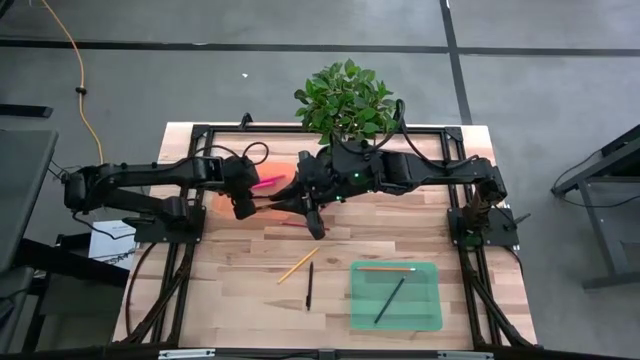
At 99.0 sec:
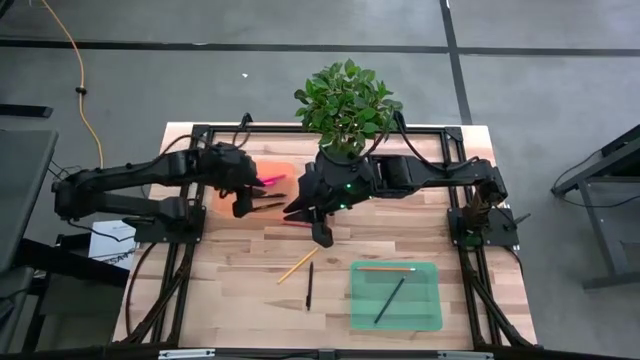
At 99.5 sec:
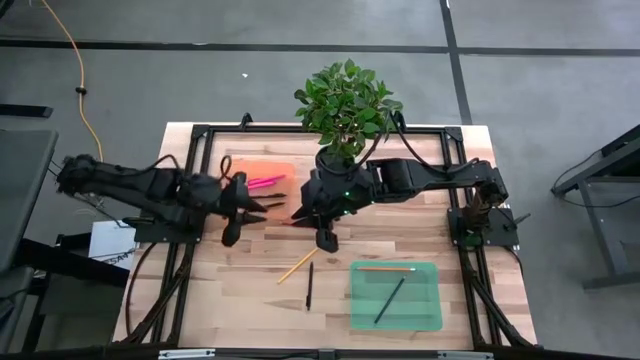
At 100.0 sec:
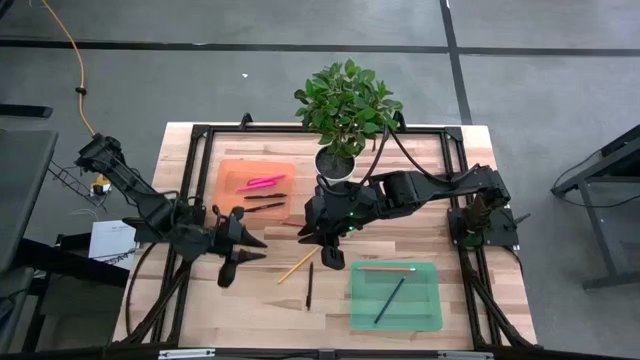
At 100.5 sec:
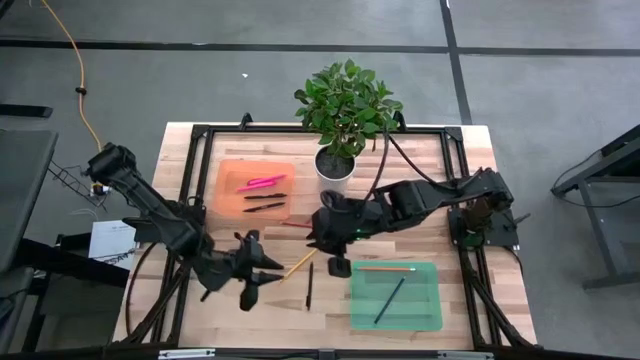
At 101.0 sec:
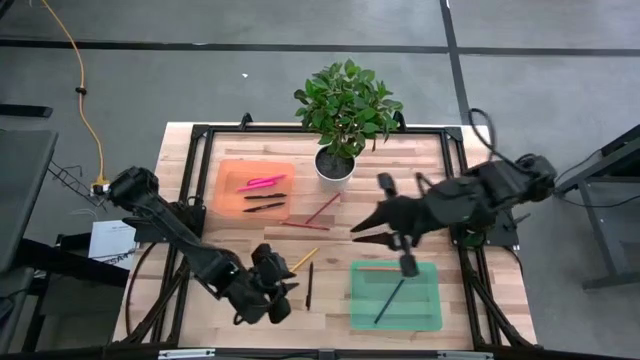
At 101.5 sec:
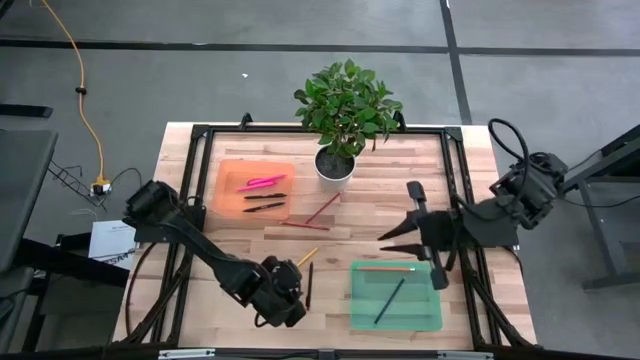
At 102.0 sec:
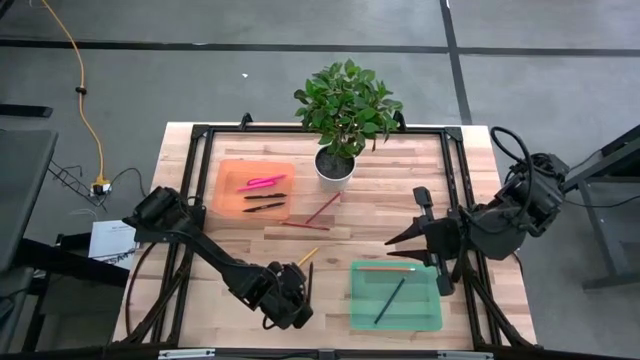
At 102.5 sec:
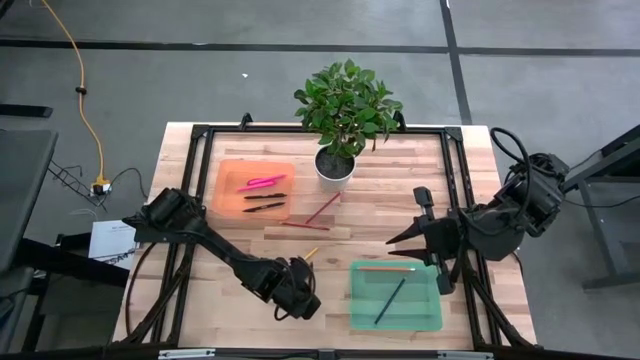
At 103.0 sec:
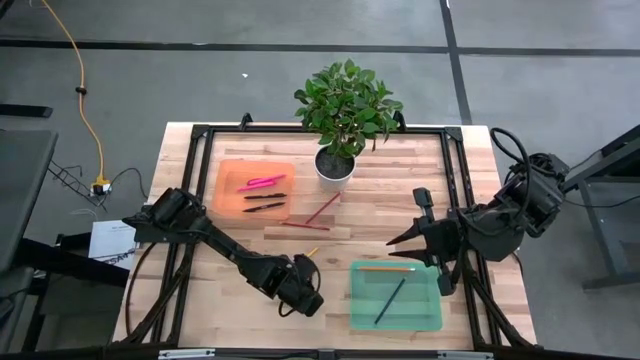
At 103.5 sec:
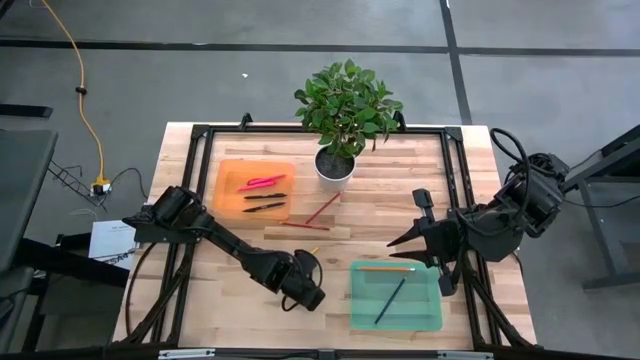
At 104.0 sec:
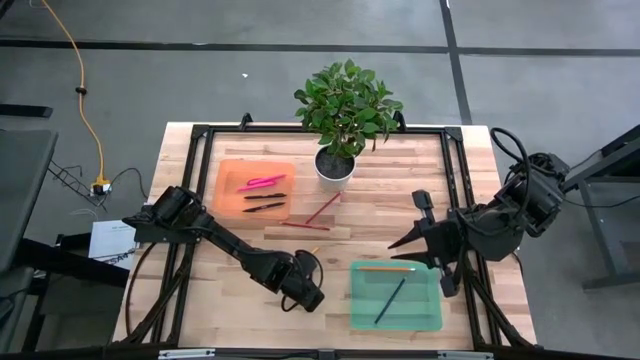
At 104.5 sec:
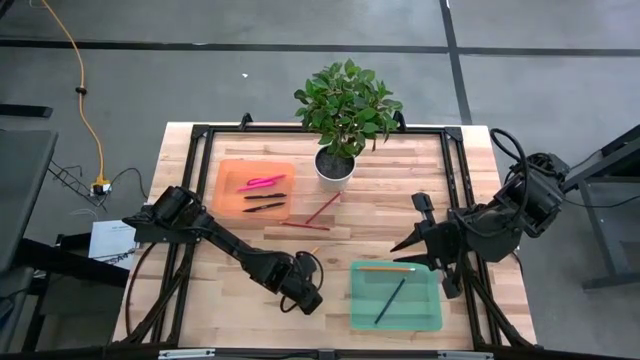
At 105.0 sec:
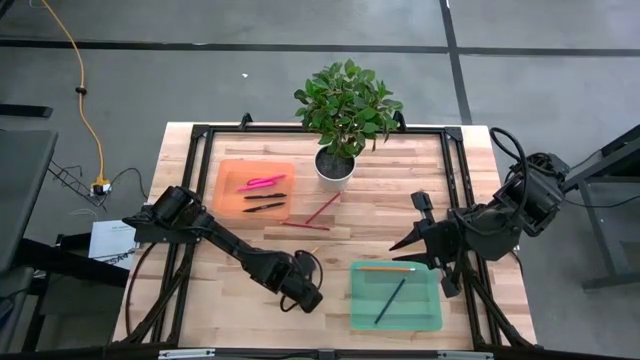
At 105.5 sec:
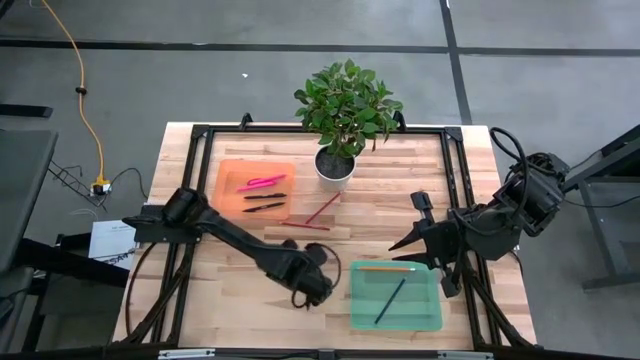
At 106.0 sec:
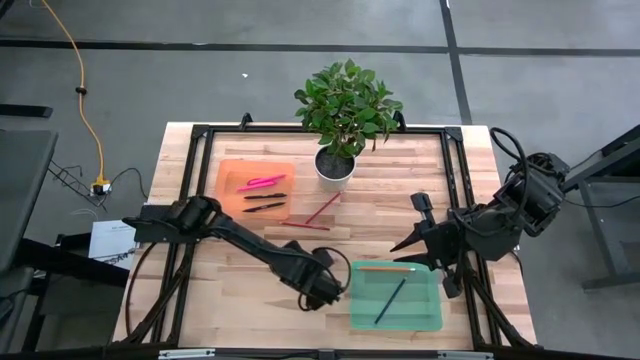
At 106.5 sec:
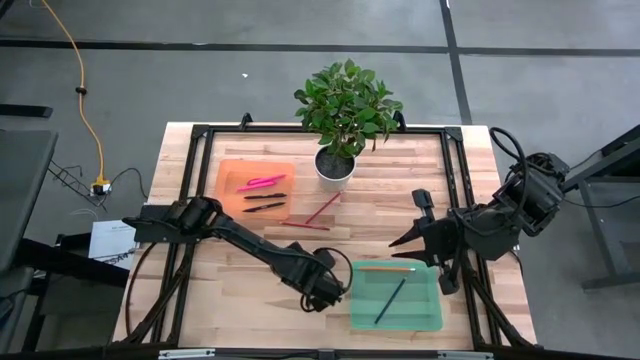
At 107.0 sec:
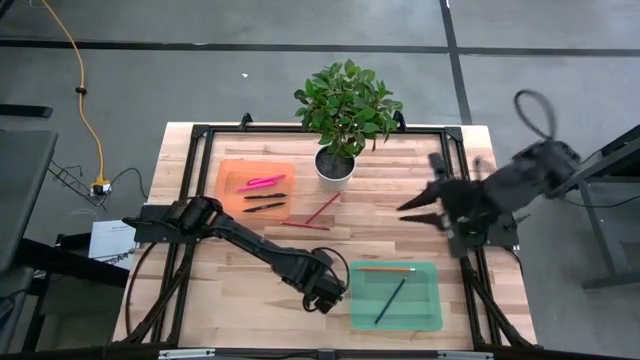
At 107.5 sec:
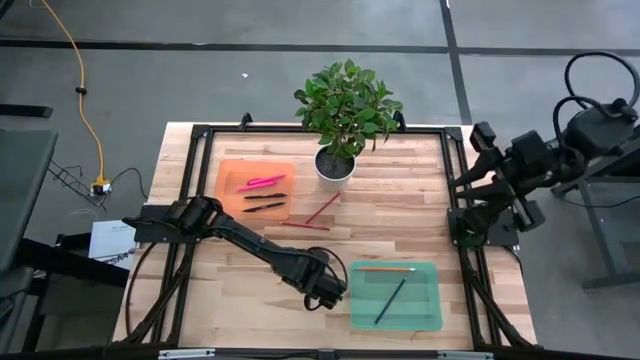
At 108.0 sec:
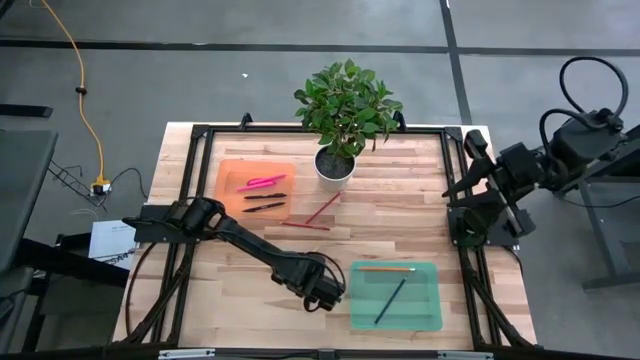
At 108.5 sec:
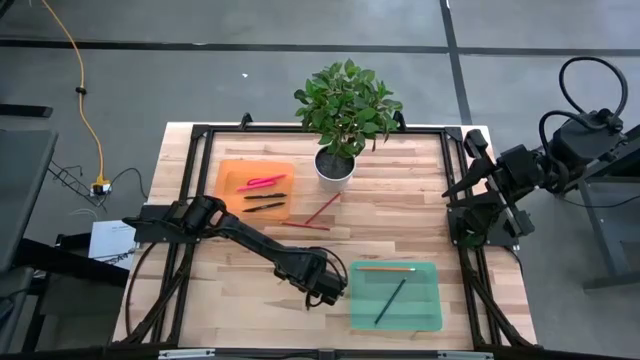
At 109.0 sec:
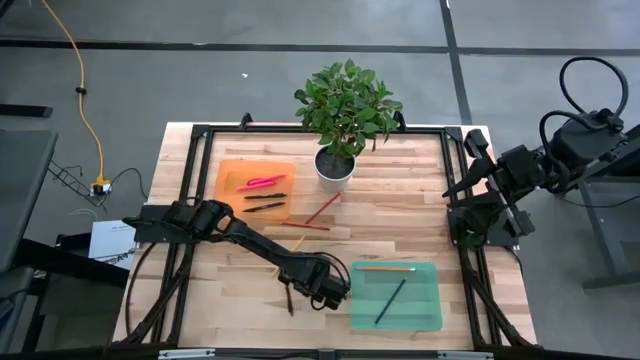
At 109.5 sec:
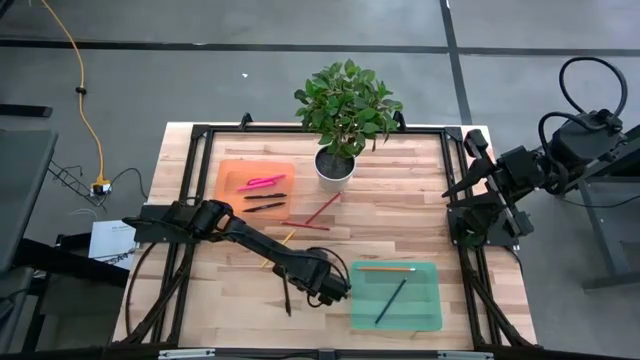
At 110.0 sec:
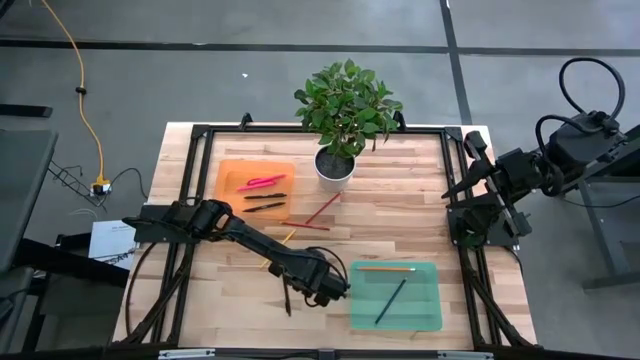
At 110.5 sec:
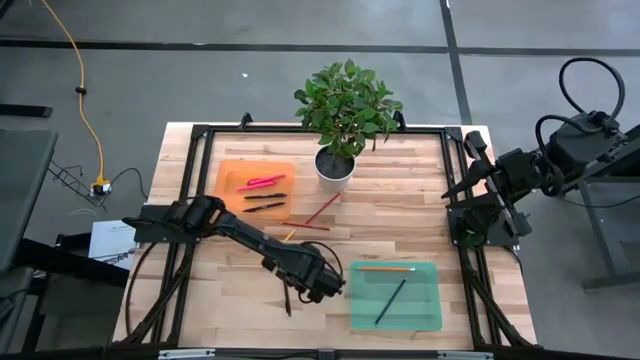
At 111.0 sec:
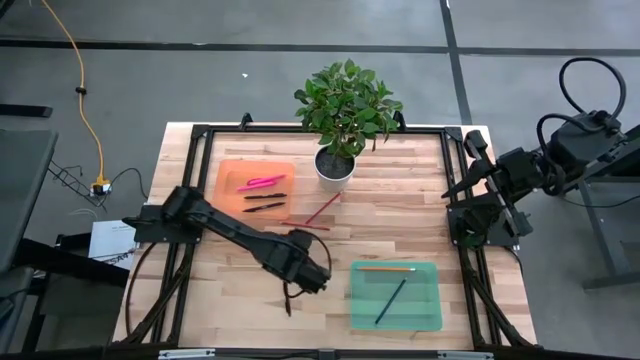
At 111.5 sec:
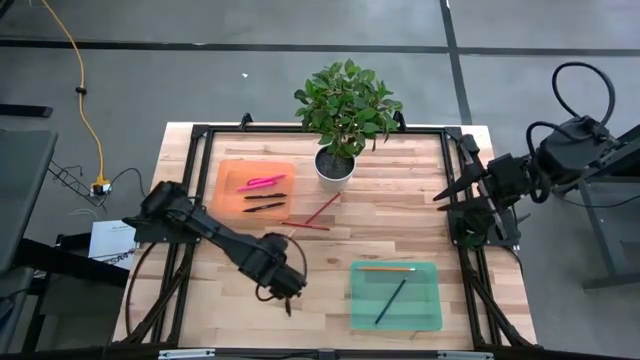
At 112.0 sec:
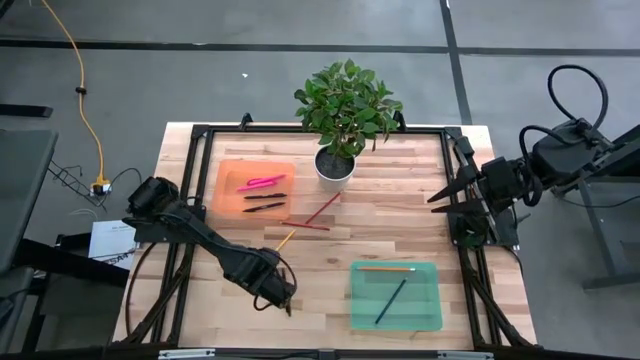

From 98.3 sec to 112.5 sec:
Task: Sort pens & pencils
Put the black pen into the orange bin

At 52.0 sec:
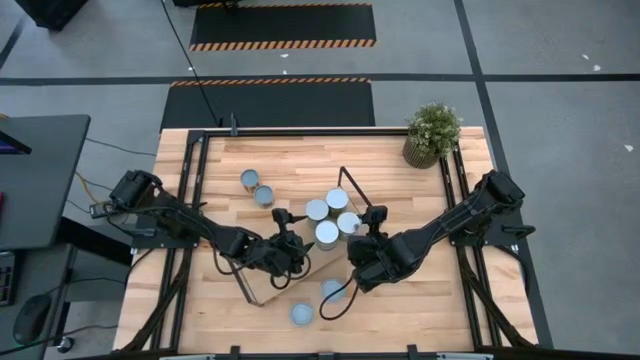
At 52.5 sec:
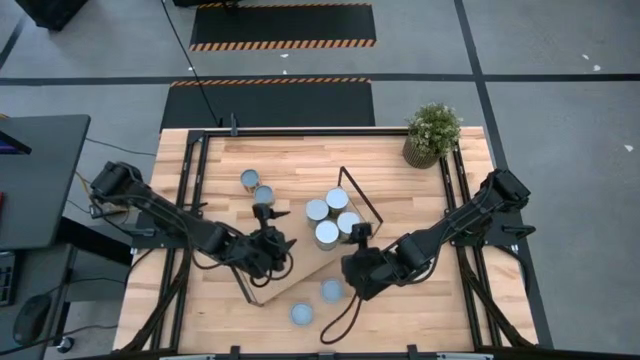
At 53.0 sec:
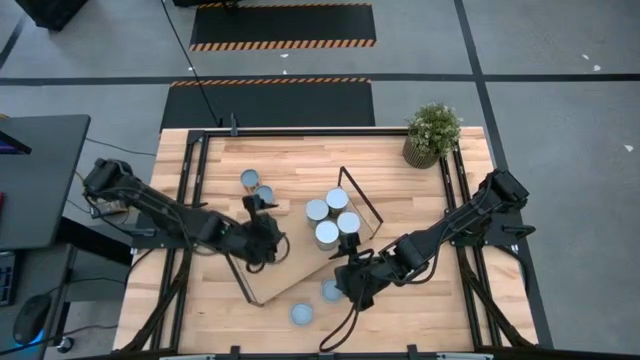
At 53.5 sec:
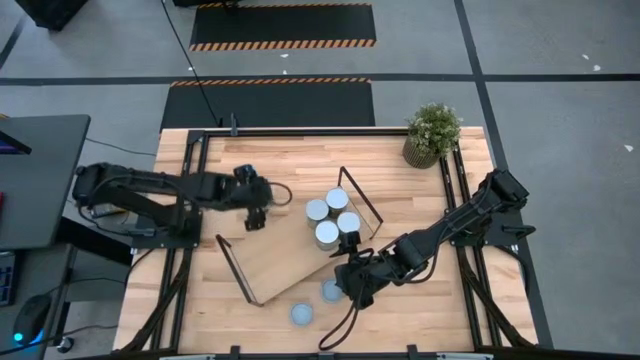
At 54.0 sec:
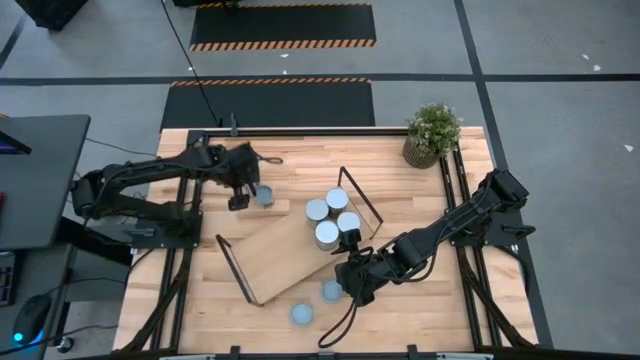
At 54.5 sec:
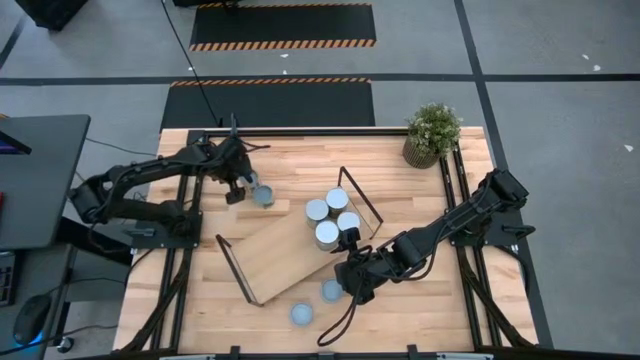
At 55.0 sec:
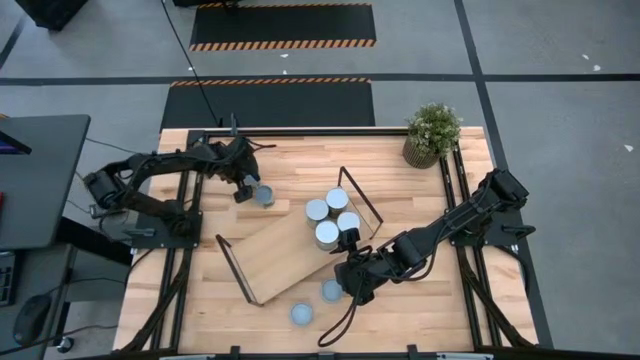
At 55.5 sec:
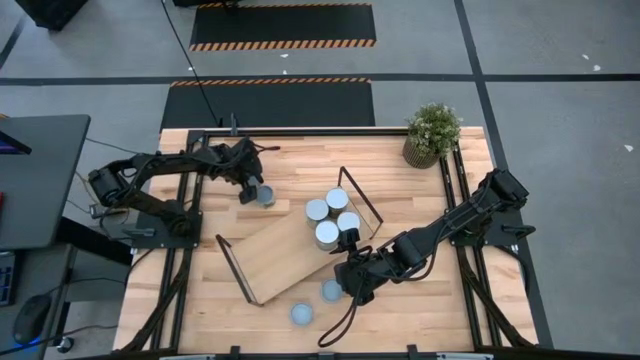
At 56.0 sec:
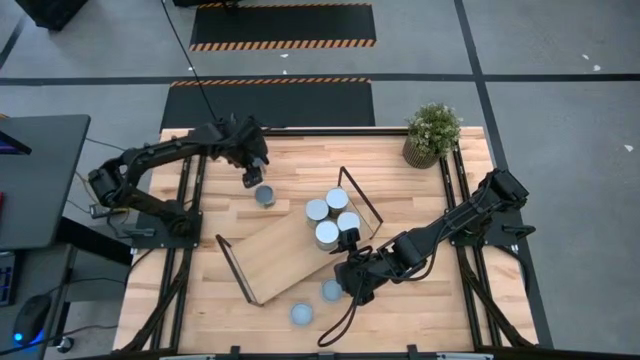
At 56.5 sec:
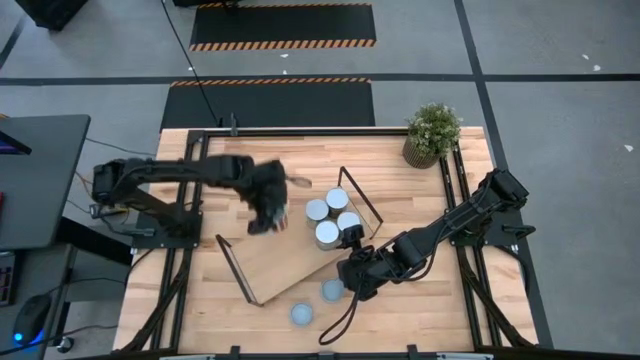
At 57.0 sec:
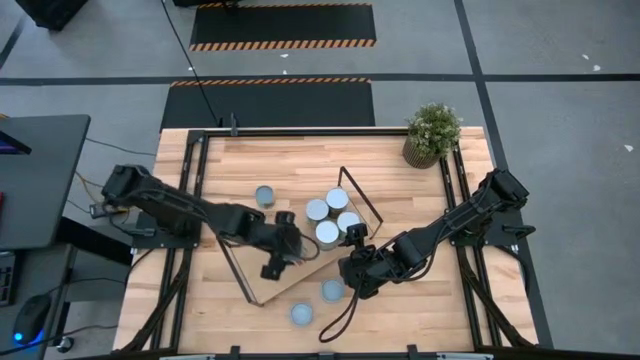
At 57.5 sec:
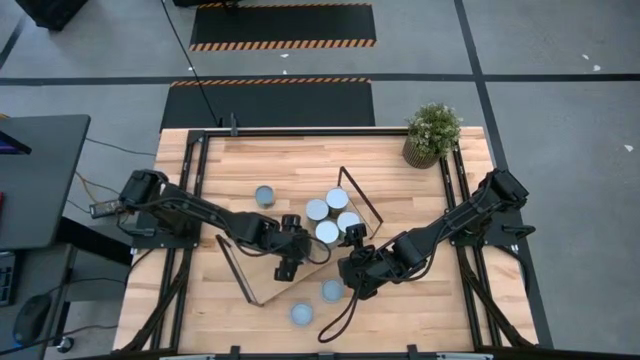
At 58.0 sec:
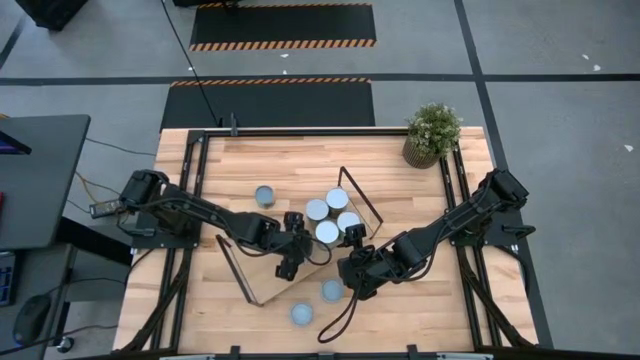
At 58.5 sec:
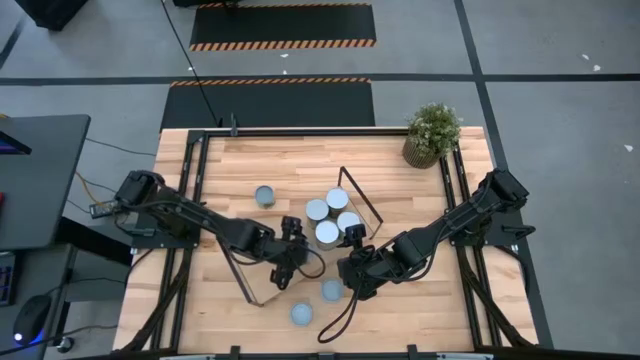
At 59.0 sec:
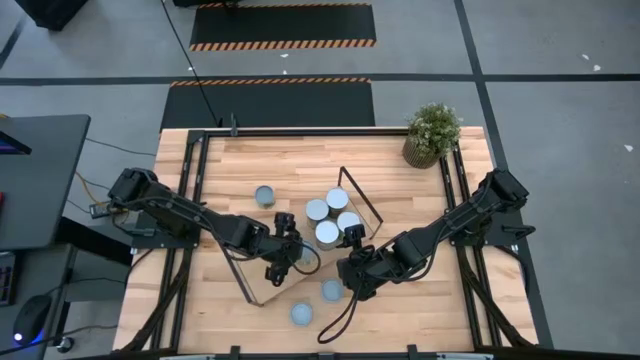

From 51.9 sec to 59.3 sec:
Task: Pick and place cans onto a shelf
Put the canned tomato on the shelf
